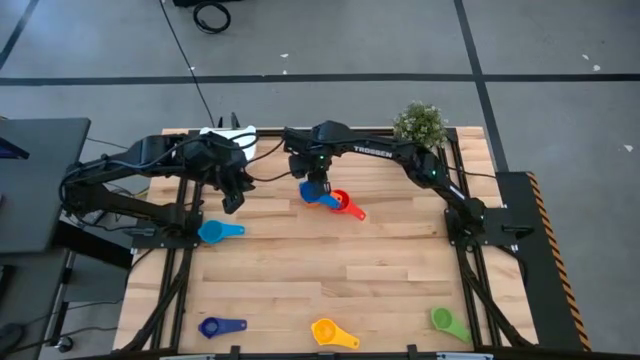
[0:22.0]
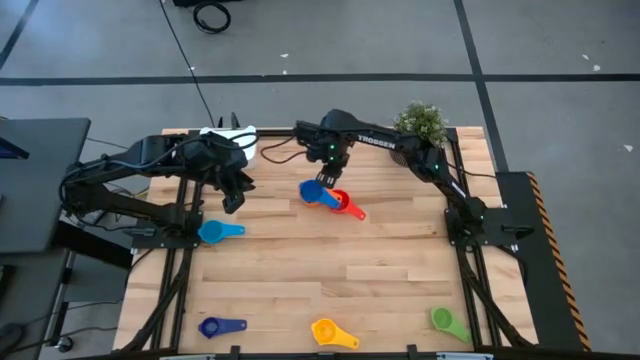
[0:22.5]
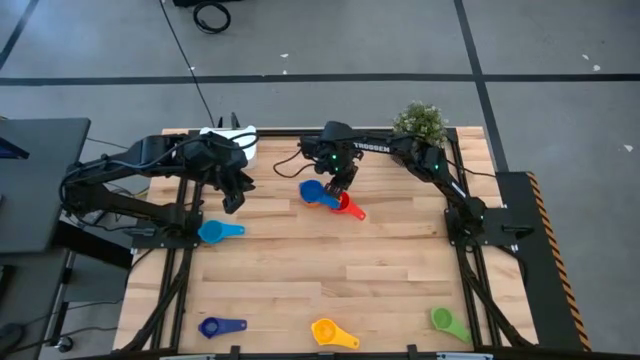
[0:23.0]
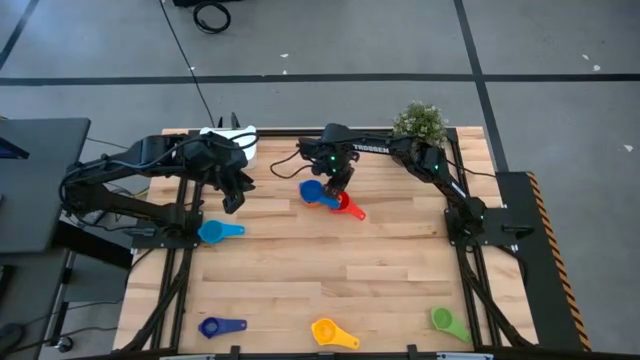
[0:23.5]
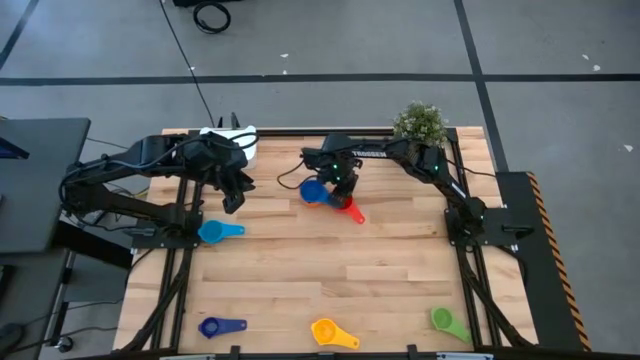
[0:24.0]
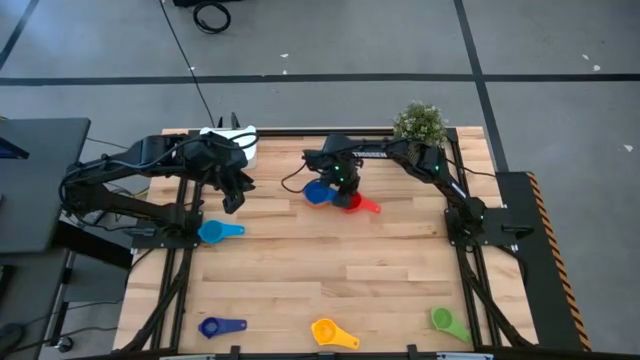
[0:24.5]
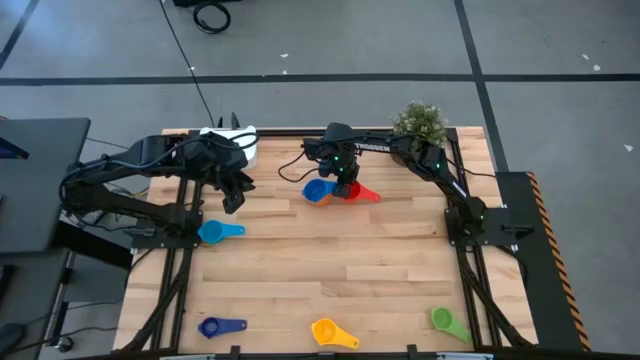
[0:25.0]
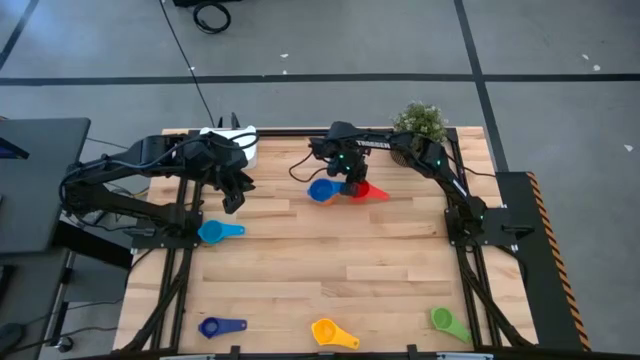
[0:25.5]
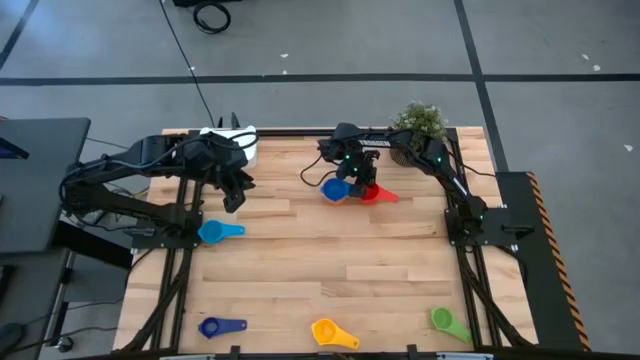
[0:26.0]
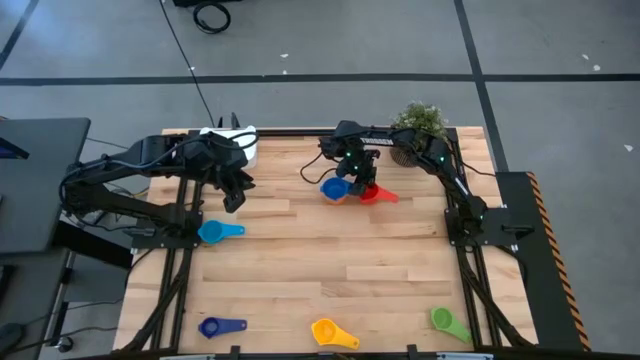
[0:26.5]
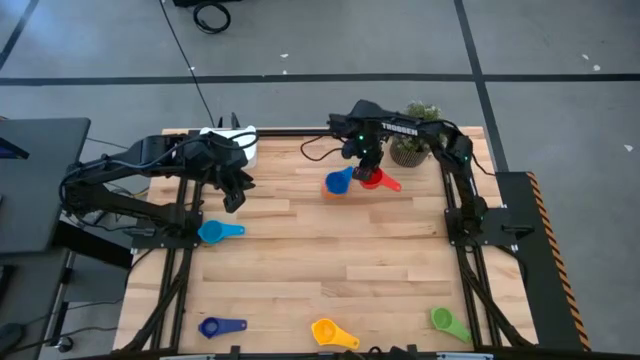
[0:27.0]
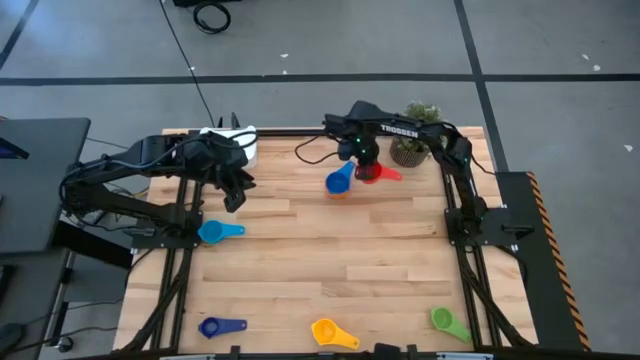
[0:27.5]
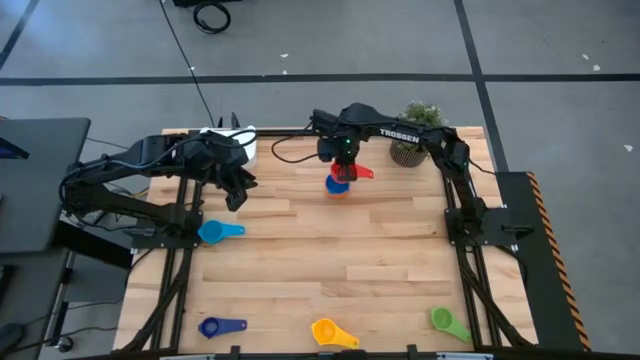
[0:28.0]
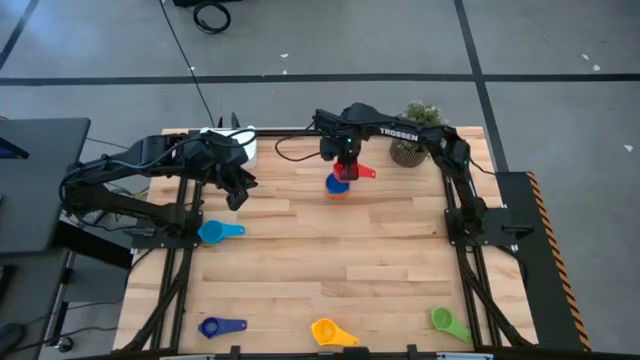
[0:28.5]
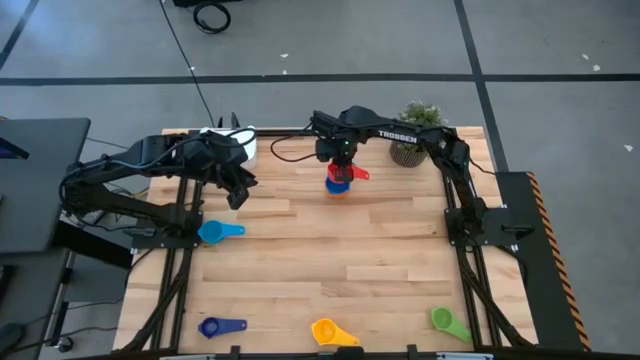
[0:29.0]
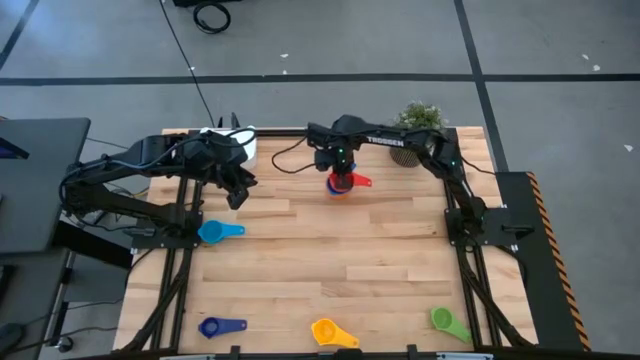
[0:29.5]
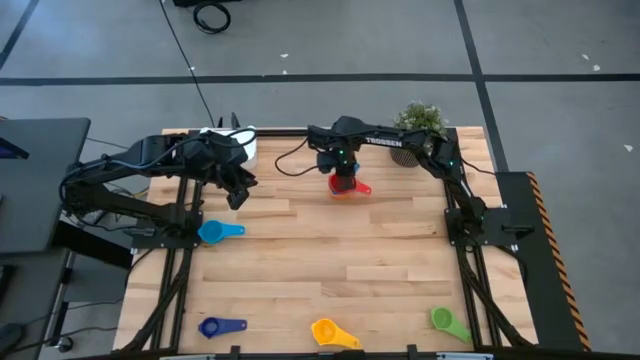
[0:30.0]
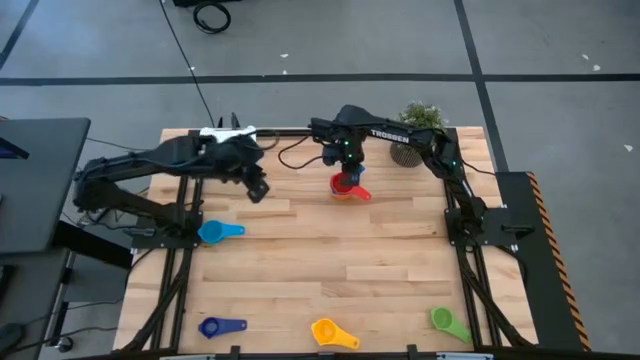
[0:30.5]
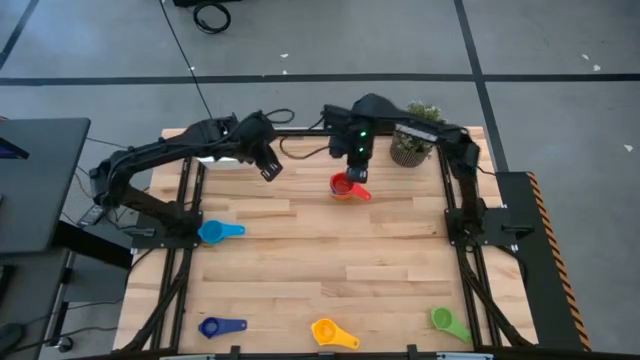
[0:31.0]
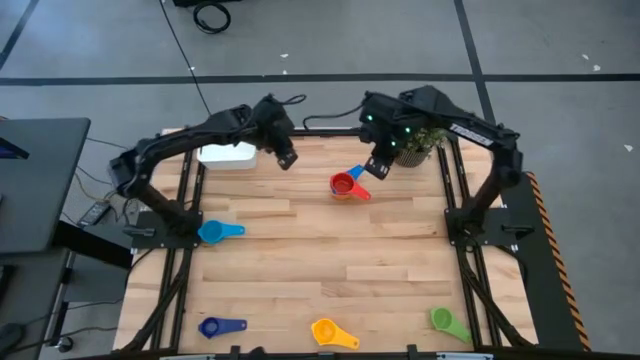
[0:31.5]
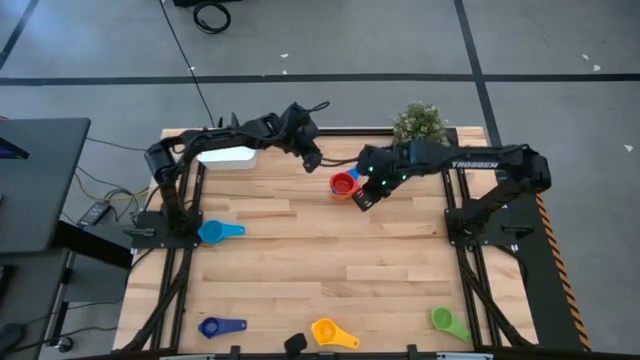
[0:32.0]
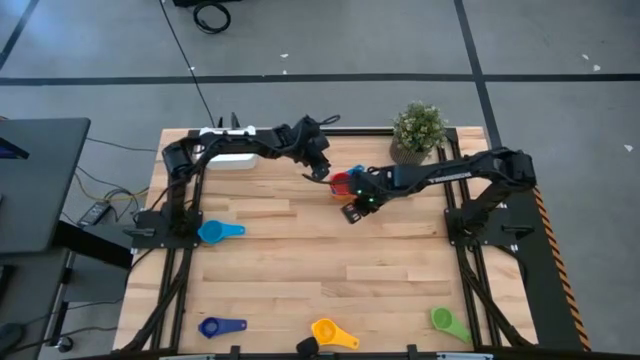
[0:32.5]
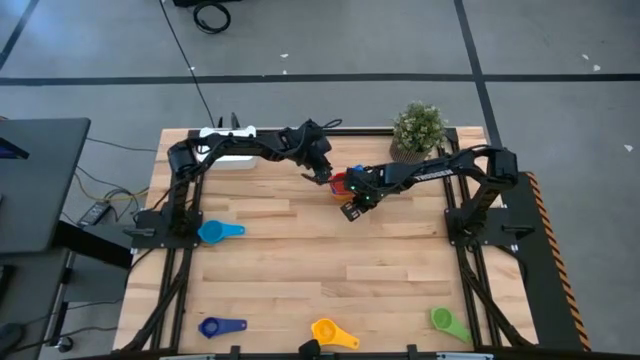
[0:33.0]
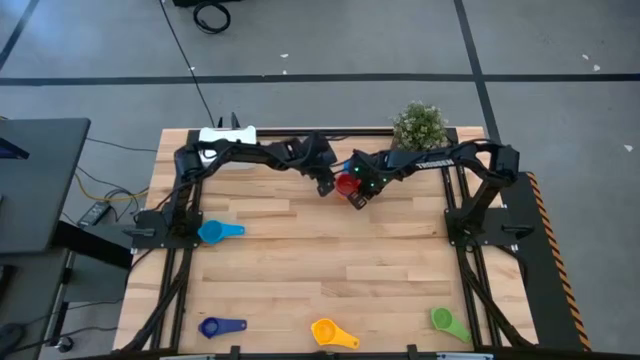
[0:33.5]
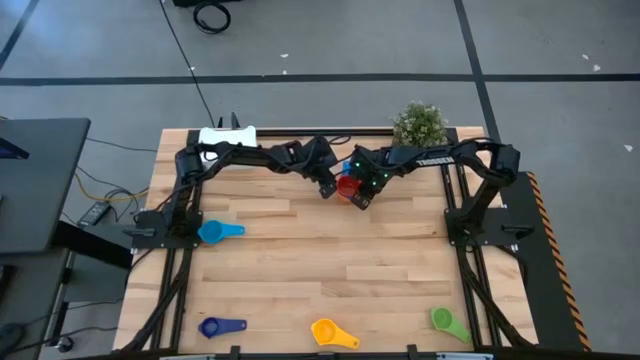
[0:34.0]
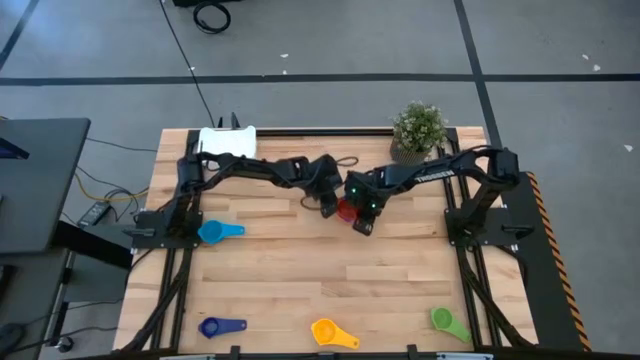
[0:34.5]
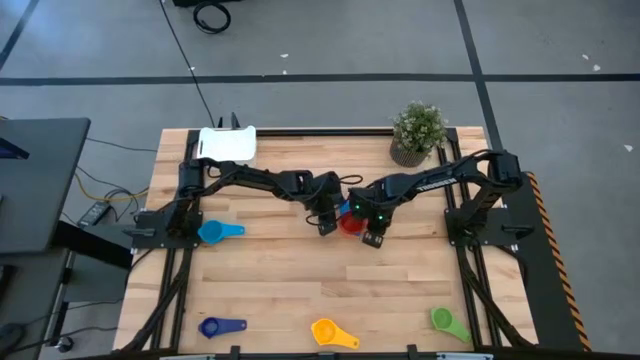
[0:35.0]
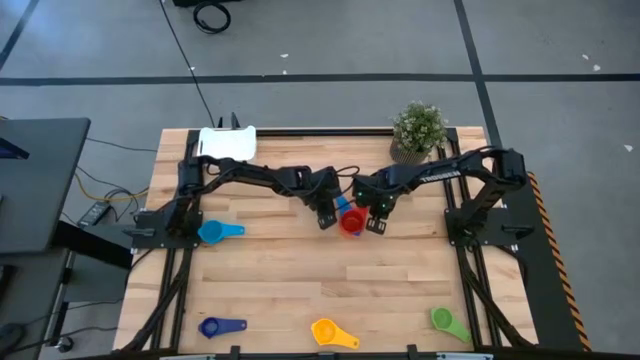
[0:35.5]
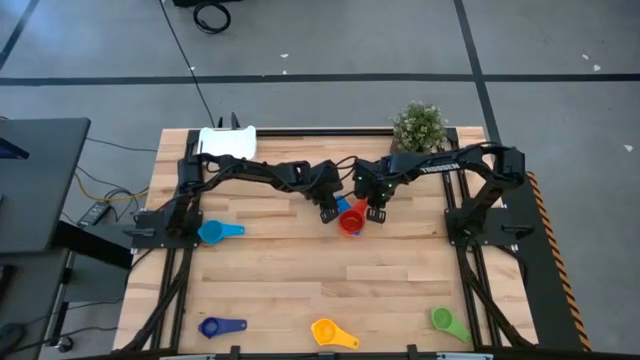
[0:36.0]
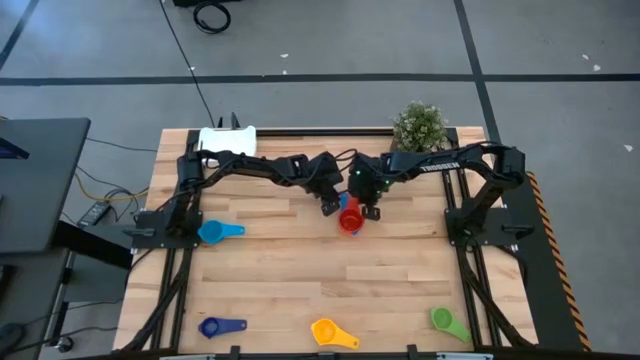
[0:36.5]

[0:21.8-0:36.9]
Task: Nest measuring cups in basket
Stack the red measuring cup on top of the blue measuring cup

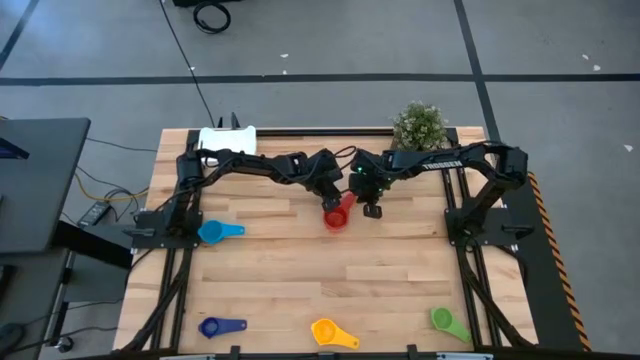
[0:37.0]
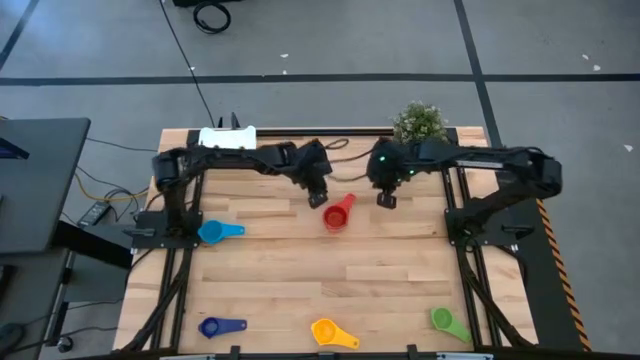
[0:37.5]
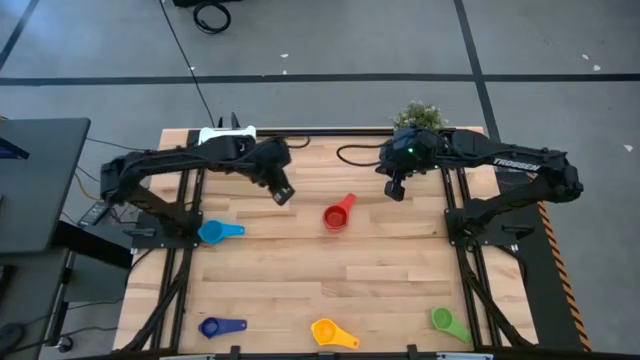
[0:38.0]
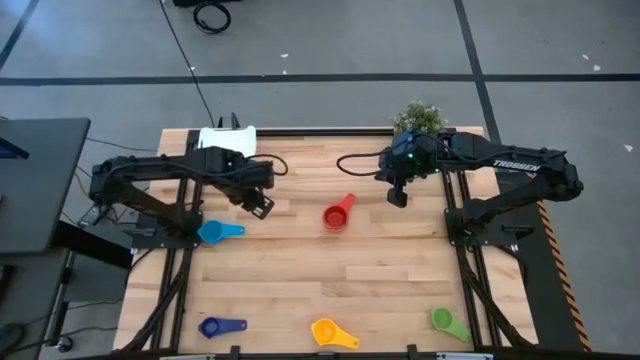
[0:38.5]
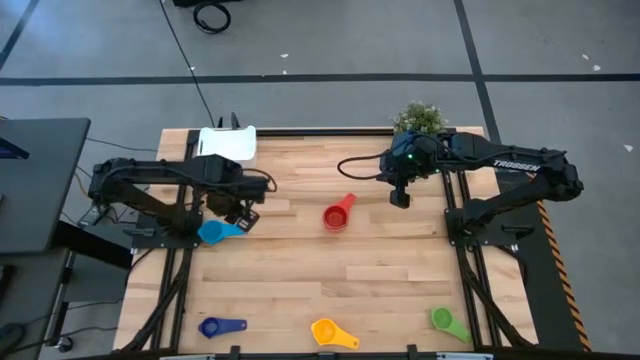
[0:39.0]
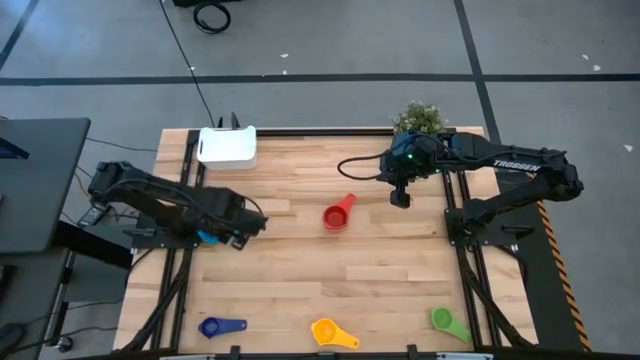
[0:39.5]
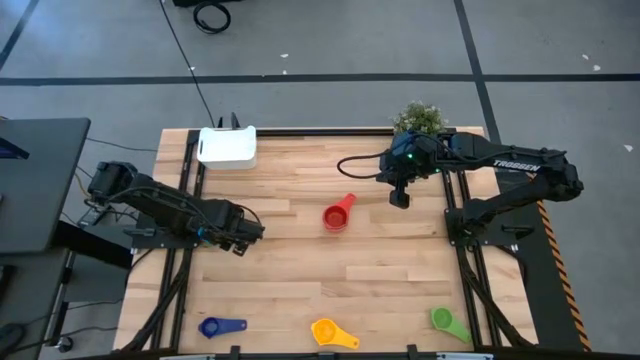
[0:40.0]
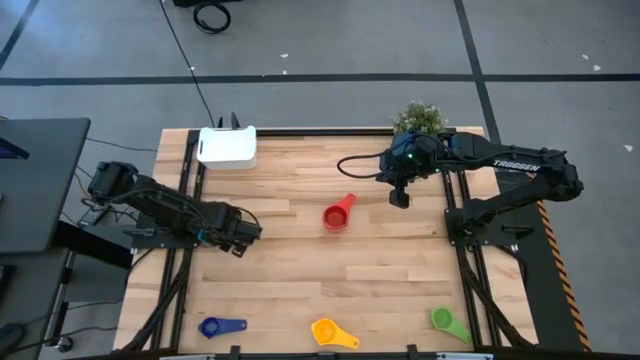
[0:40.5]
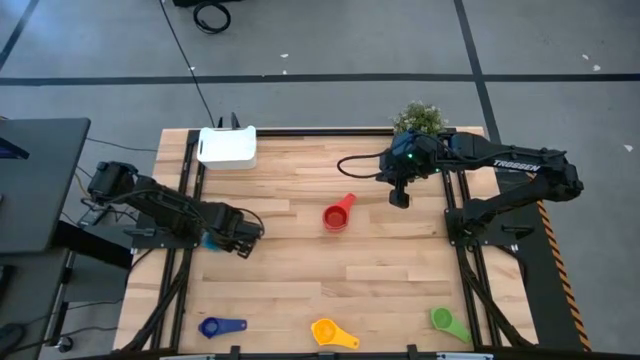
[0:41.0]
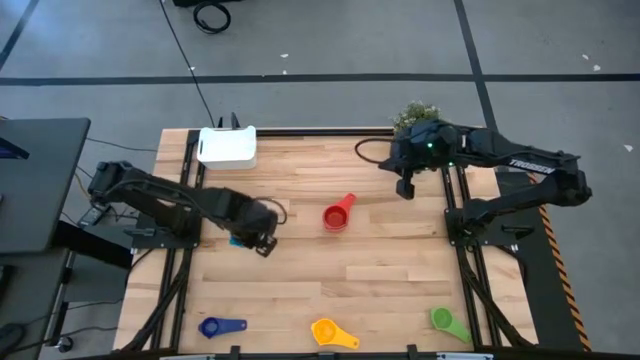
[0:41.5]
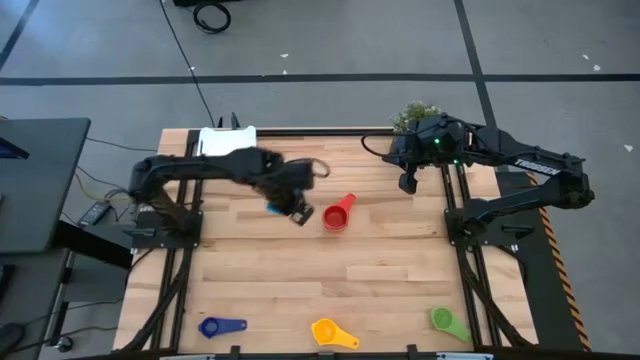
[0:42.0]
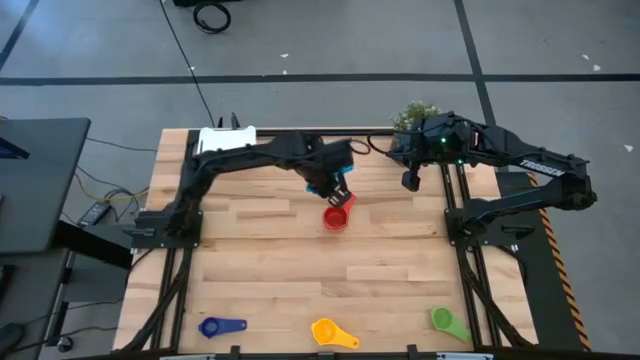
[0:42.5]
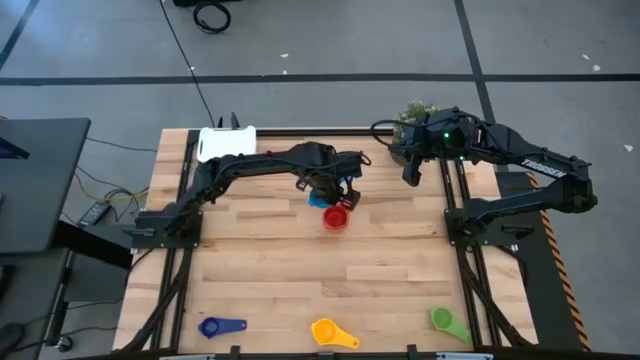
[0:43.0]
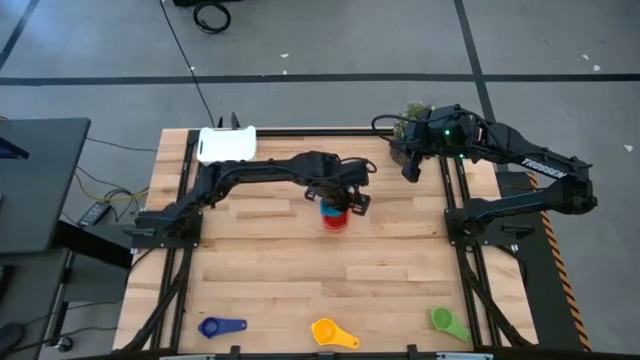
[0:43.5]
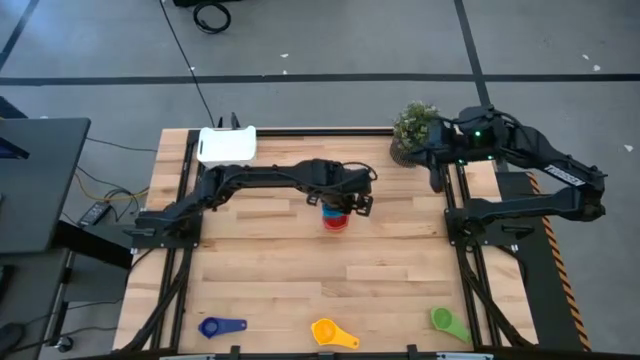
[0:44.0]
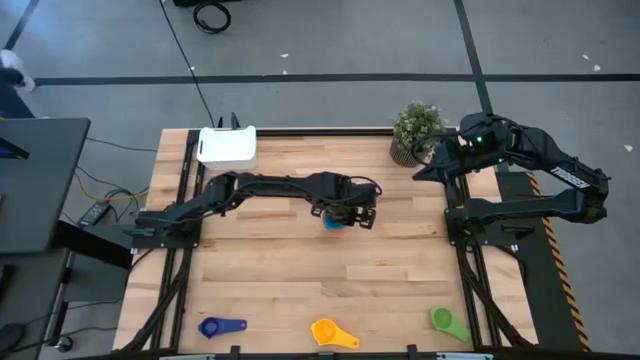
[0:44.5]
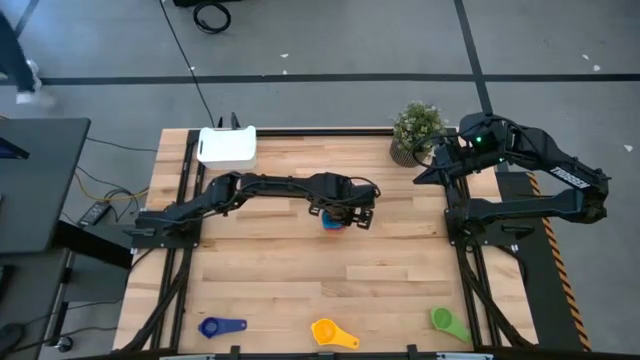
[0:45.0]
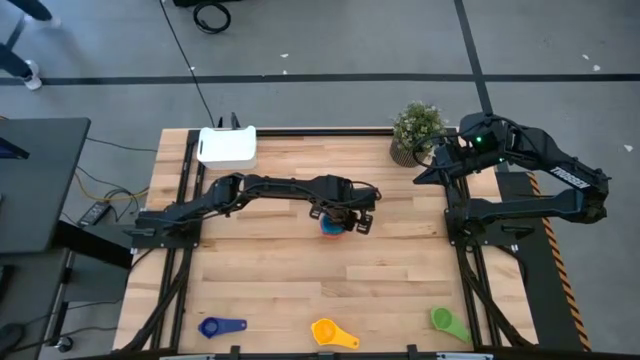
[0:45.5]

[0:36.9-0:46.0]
Stack the light blue measuring cup on top of the red measuring cup
